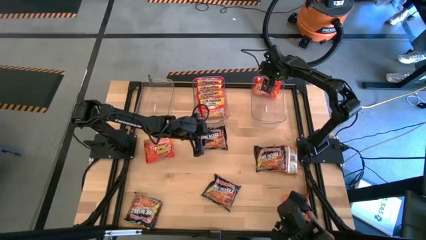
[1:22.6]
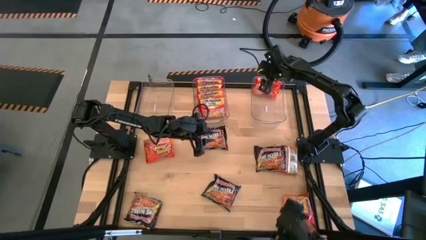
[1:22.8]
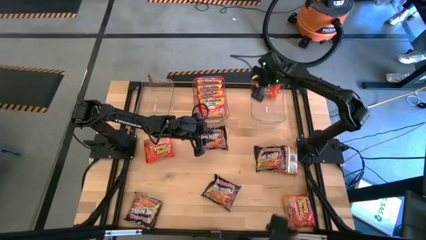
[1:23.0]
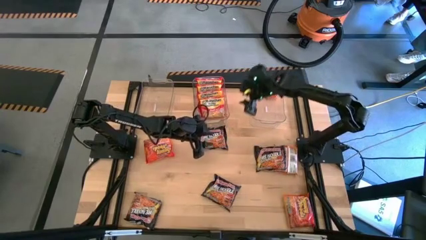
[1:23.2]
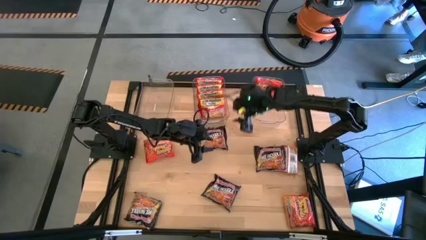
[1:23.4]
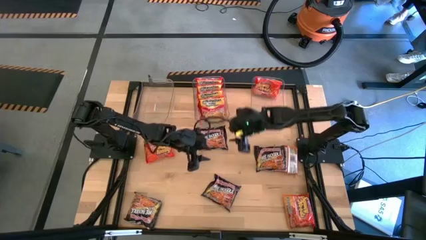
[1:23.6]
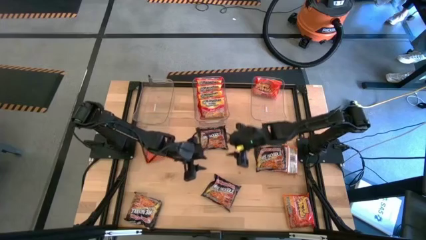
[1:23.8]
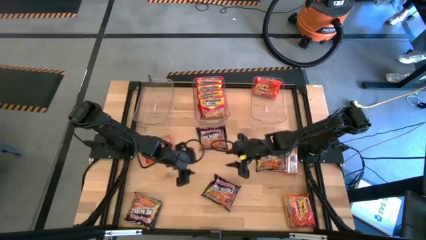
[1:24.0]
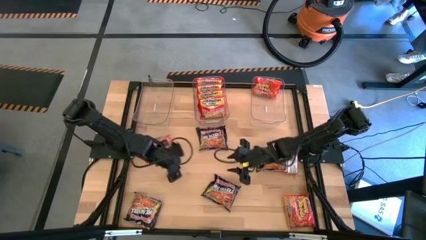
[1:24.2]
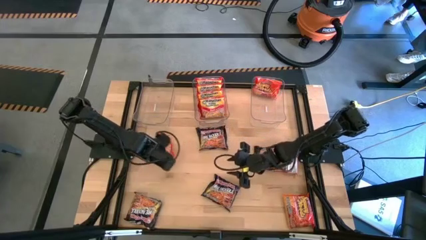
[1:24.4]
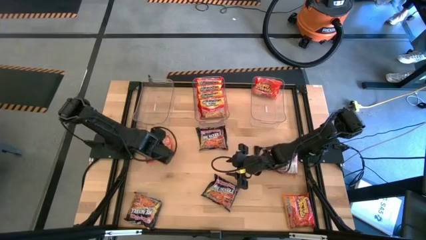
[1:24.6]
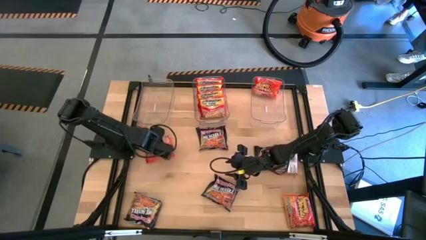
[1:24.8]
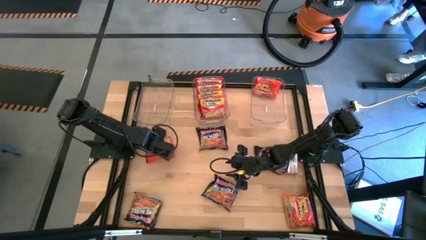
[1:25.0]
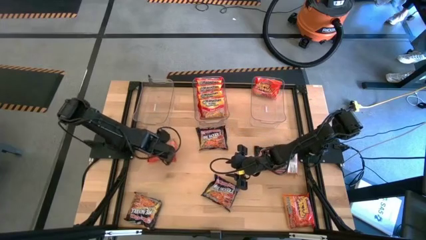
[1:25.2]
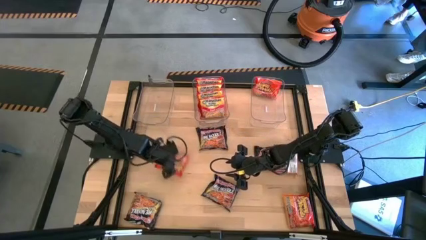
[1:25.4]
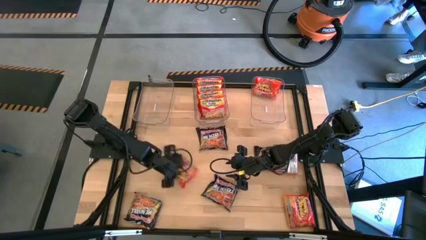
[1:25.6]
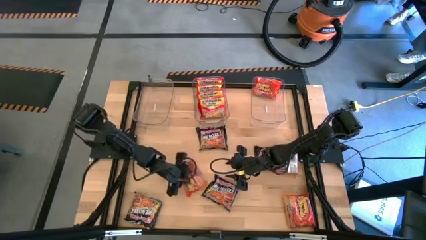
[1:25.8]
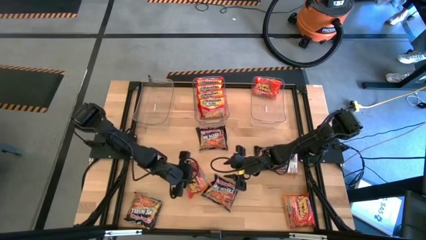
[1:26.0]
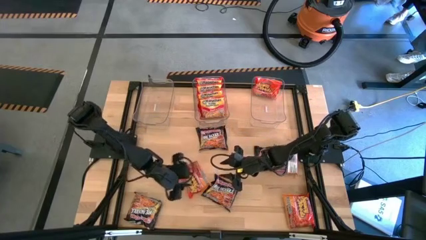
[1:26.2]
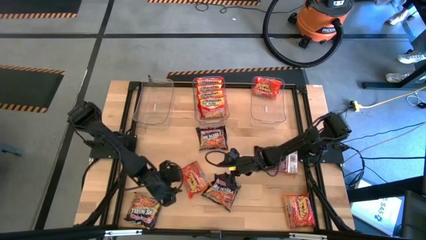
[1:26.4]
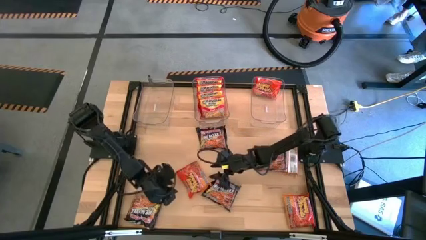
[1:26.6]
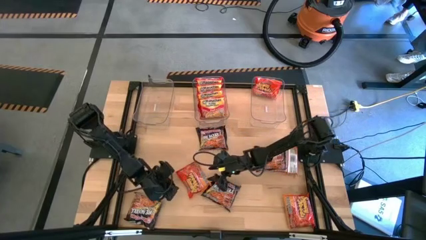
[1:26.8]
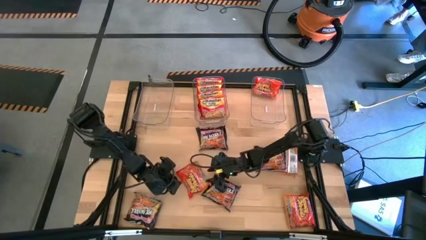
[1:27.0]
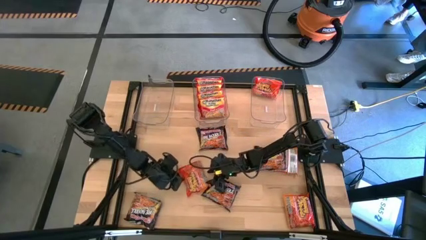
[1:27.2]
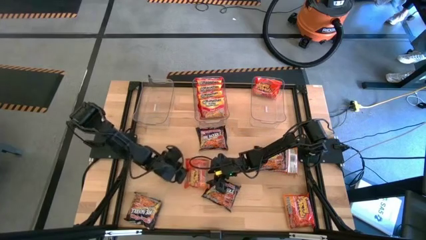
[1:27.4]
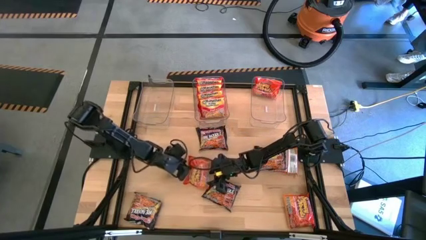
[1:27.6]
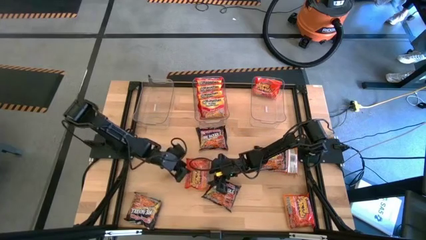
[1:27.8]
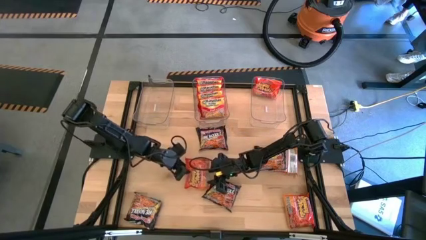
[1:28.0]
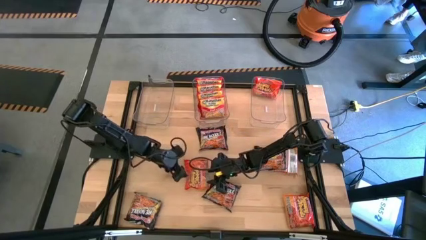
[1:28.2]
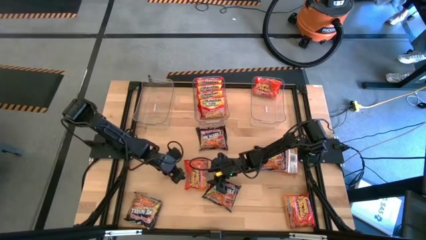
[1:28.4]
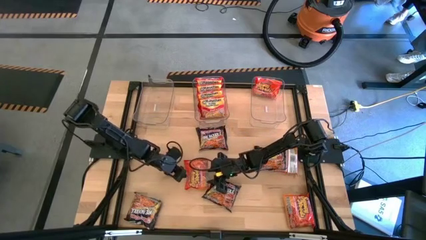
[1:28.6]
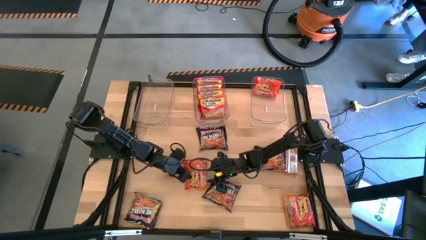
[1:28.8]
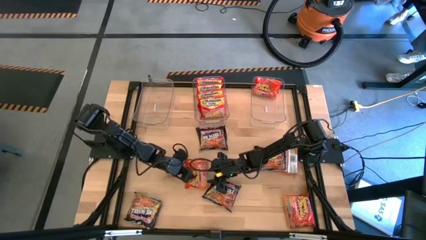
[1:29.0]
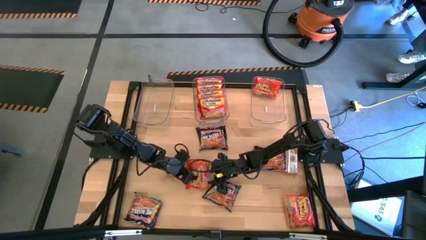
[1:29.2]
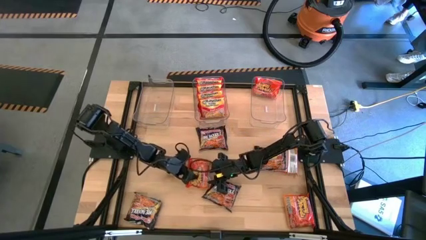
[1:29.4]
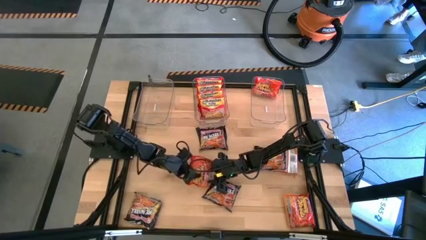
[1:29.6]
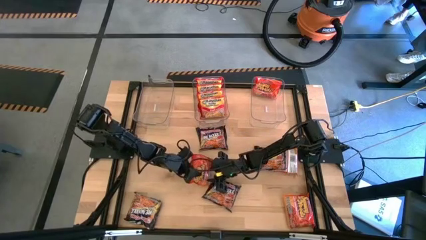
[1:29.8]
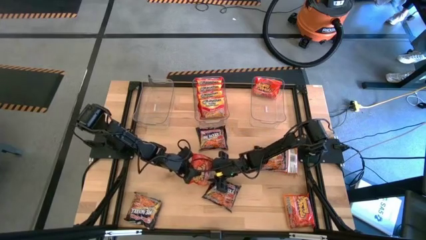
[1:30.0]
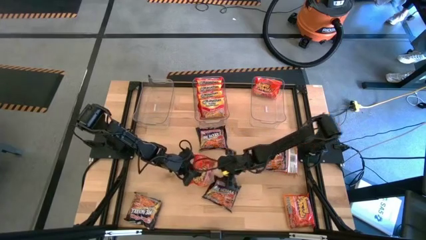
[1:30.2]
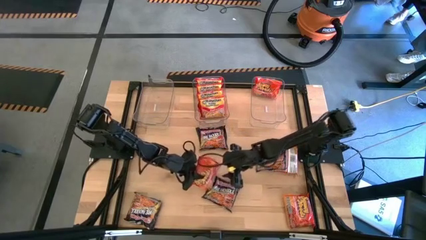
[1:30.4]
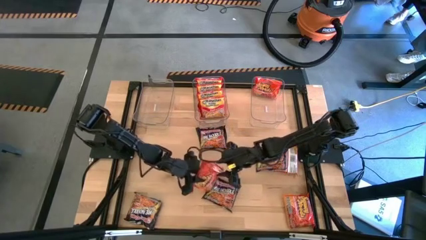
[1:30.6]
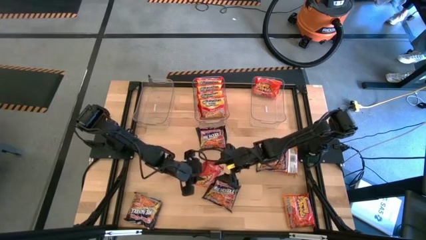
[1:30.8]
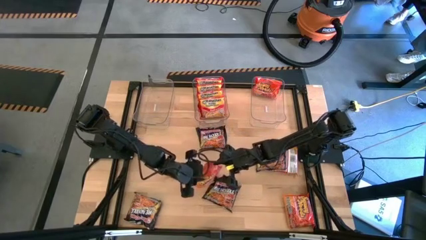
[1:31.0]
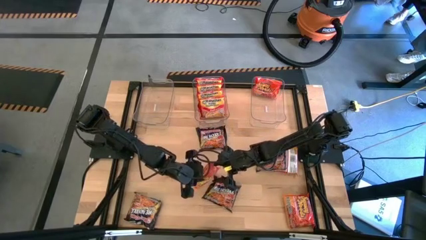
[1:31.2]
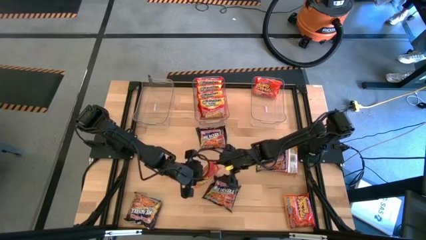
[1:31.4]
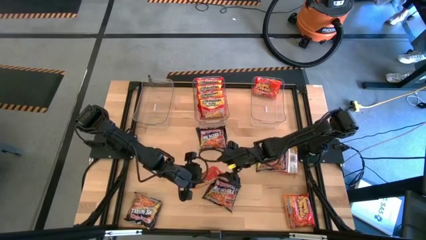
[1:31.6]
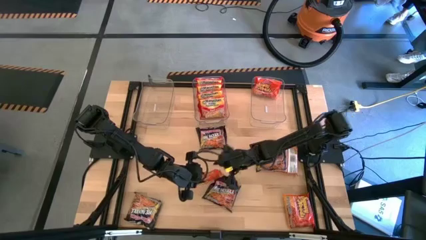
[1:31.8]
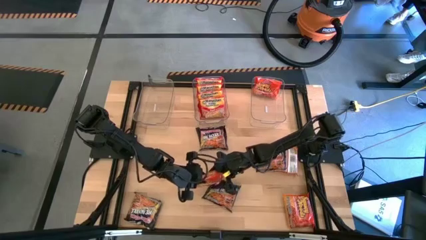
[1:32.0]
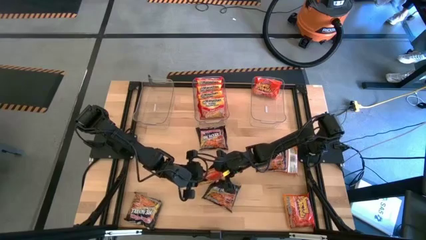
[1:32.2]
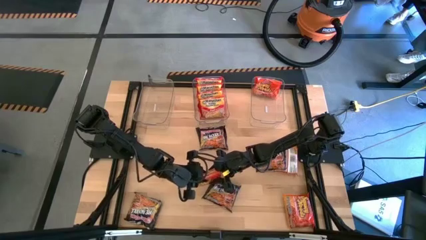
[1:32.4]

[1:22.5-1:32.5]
Task: Sort Maruchan noodles
Put the top left orange noodle pack into the right transparent bin
